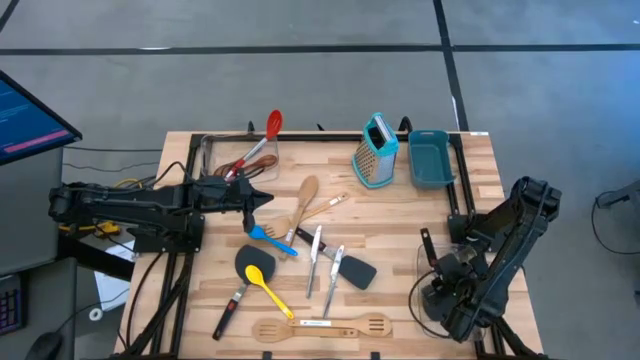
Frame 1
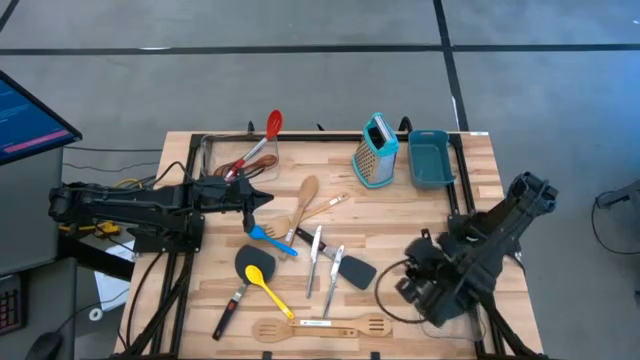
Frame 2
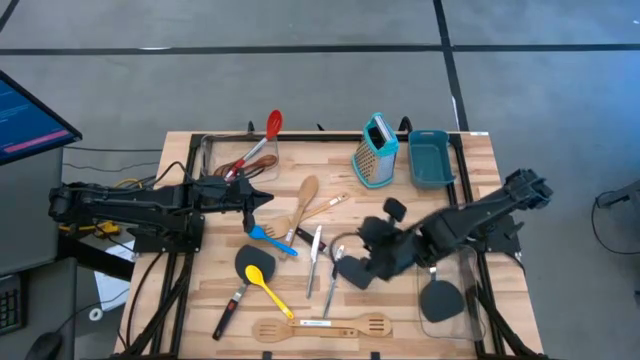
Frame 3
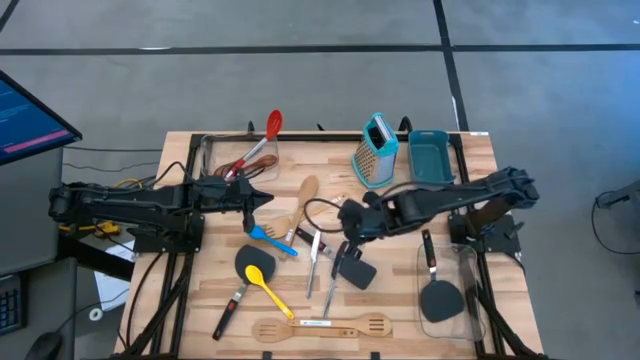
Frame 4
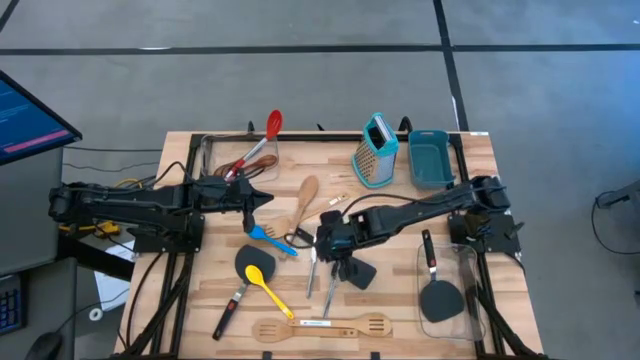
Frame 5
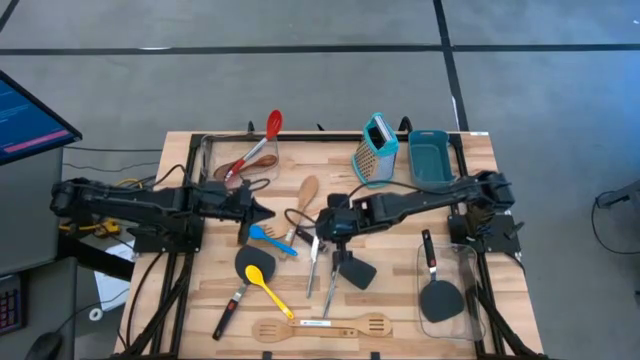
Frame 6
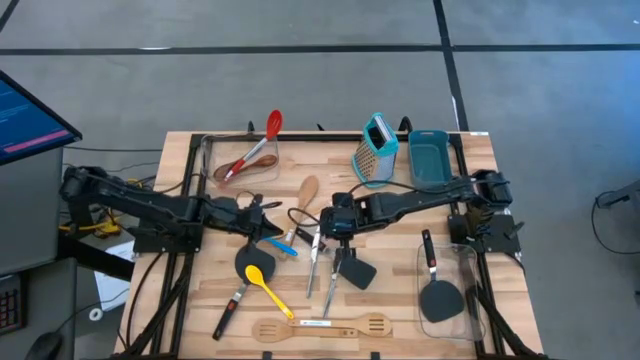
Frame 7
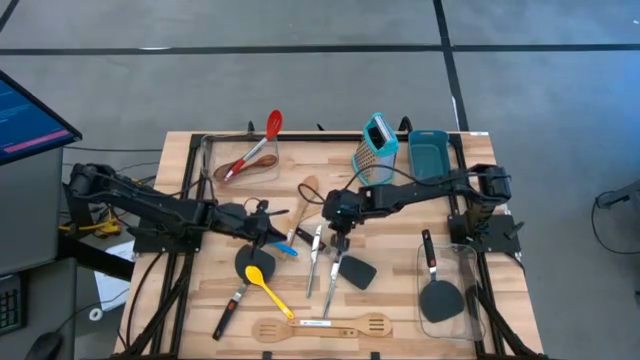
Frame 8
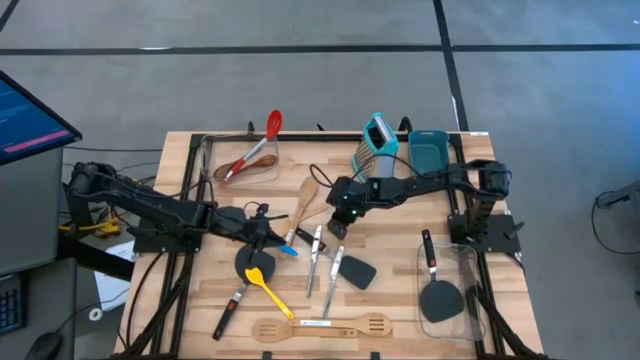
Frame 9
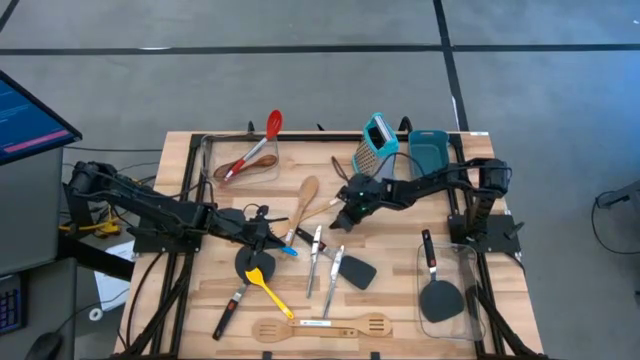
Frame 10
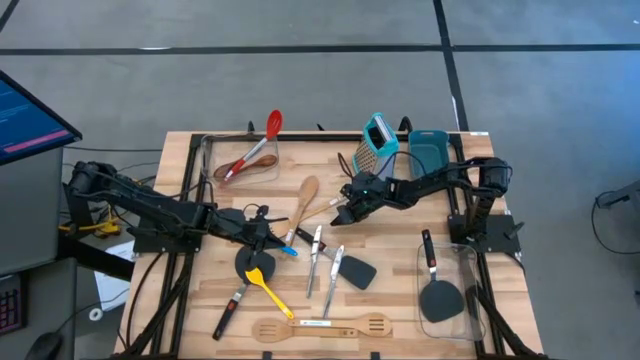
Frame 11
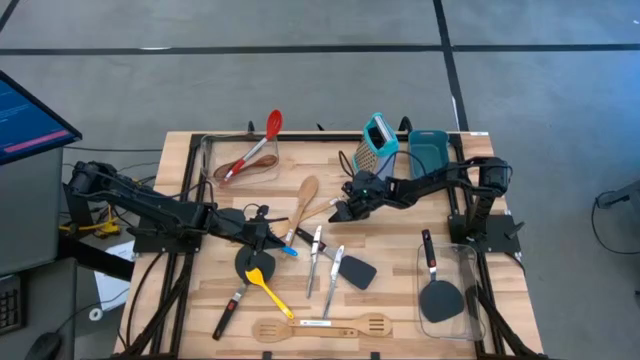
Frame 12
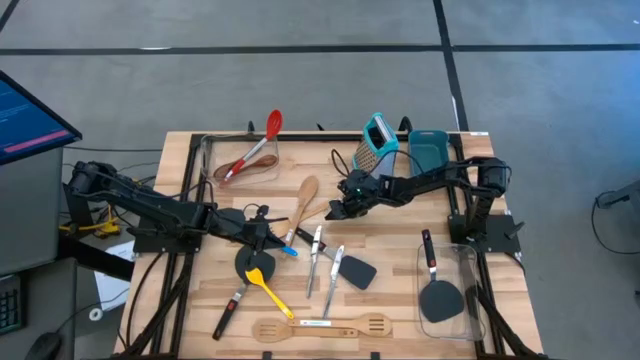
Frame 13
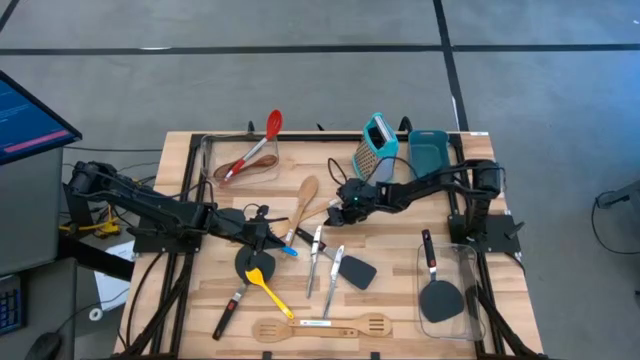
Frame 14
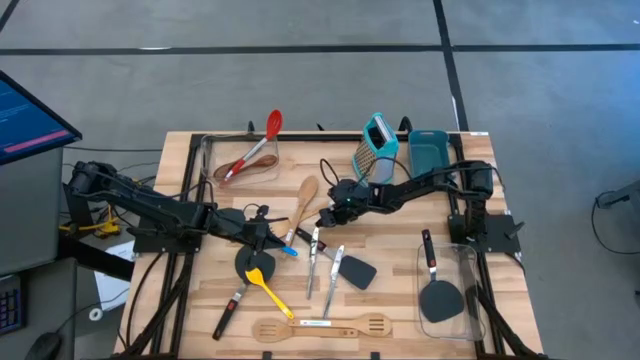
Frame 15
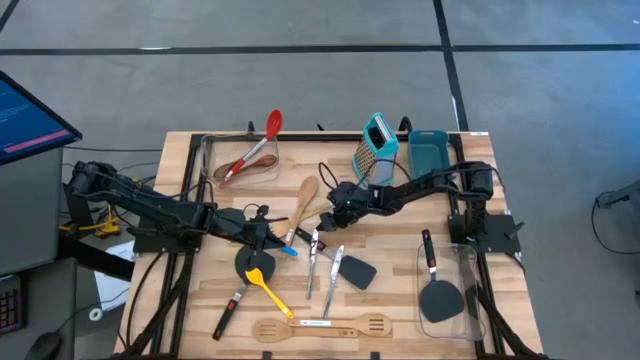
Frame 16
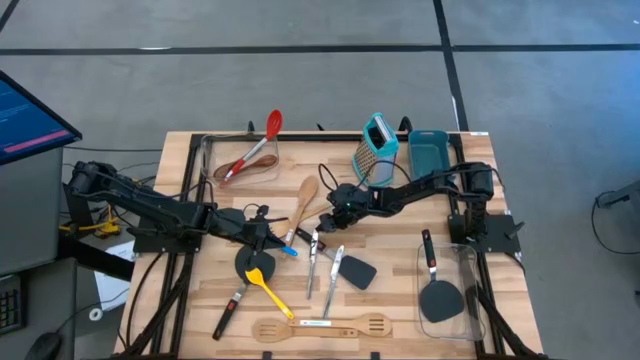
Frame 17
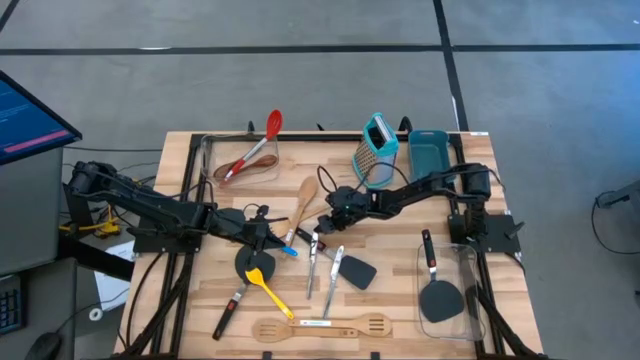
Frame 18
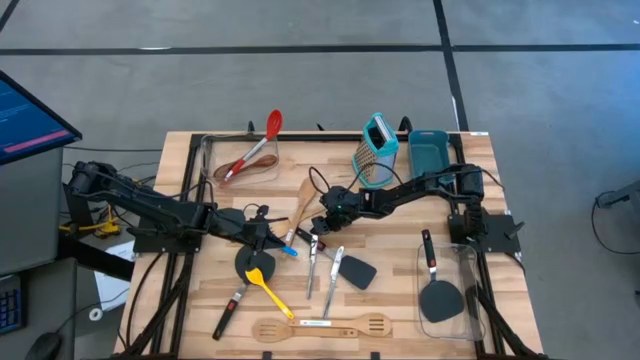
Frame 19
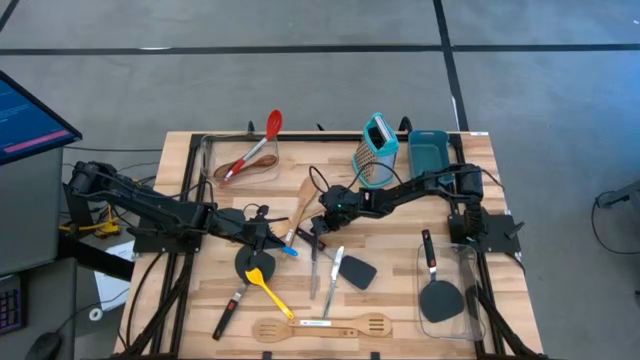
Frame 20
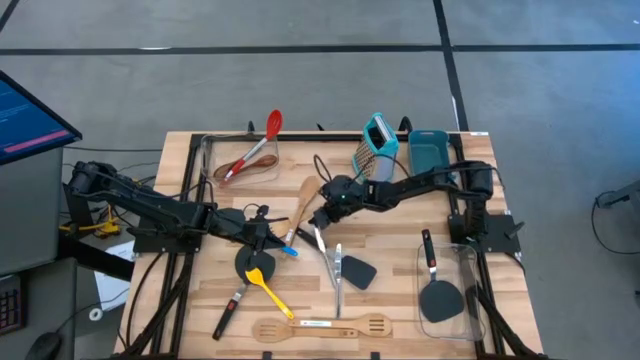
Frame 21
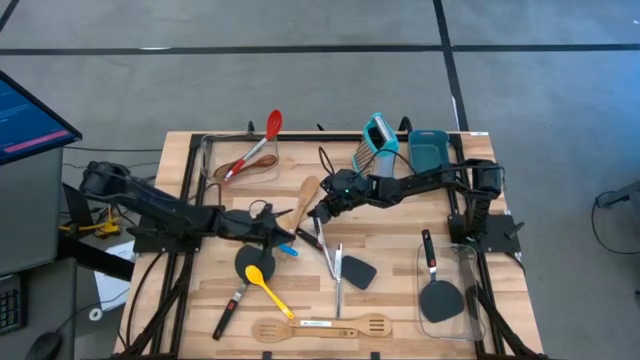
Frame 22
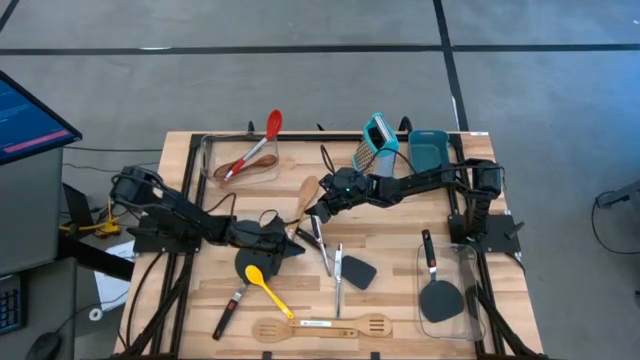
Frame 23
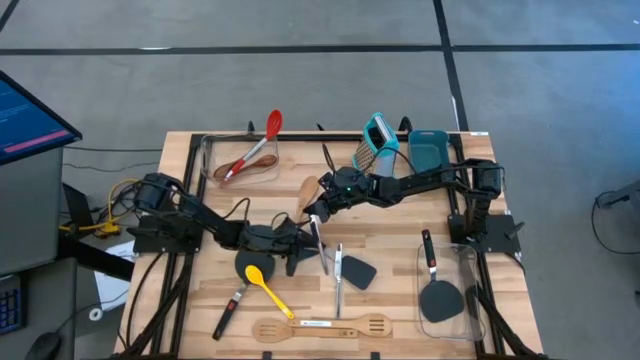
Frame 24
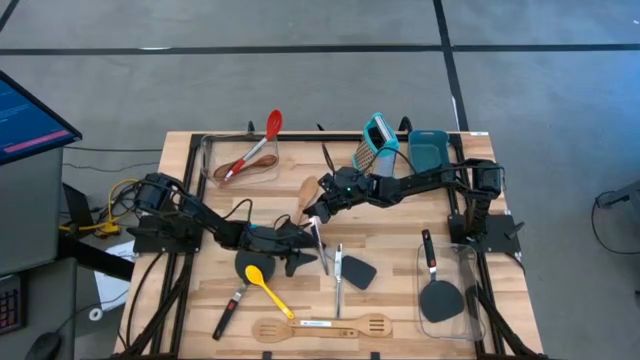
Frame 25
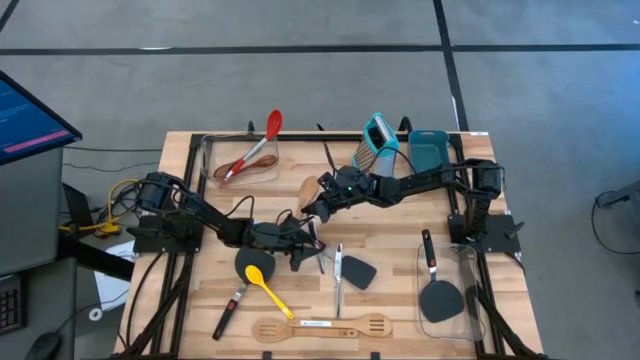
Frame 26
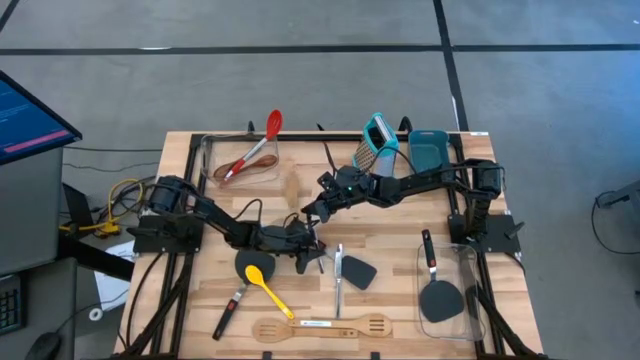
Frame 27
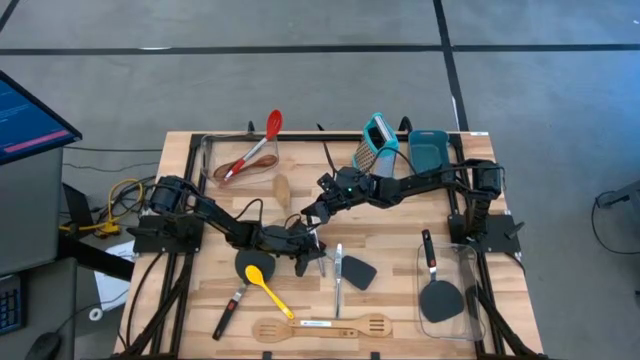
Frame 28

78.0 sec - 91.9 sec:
Task: Pick & Place Kitchen Items
Put the left silver knife into the green bin

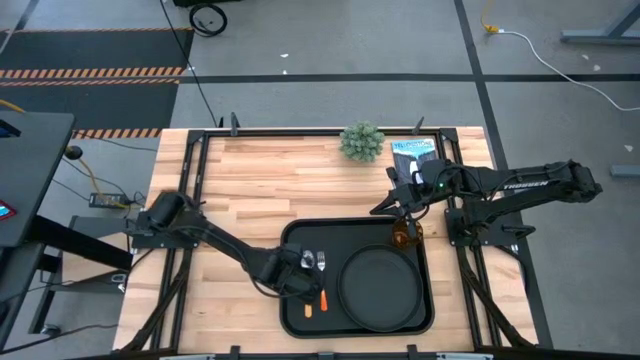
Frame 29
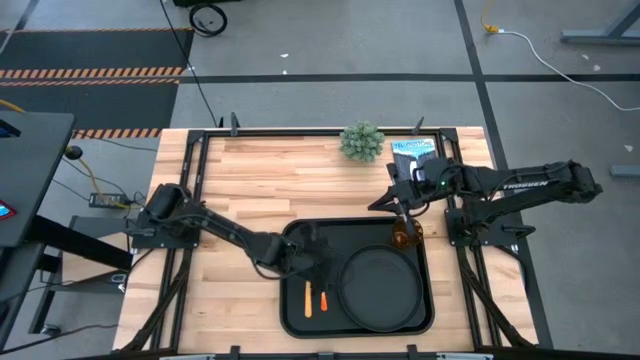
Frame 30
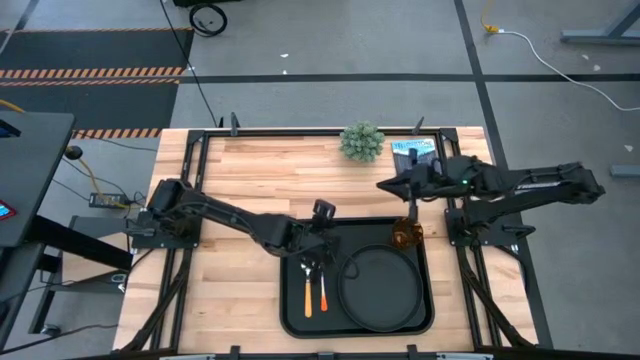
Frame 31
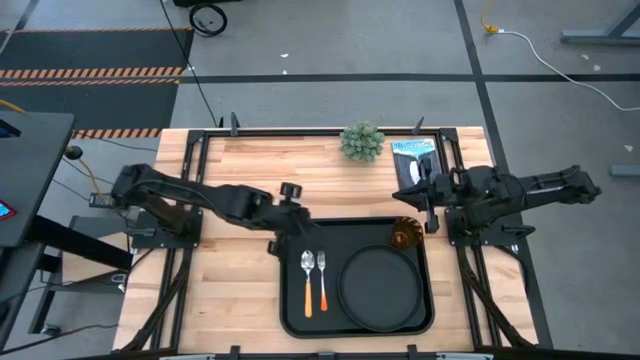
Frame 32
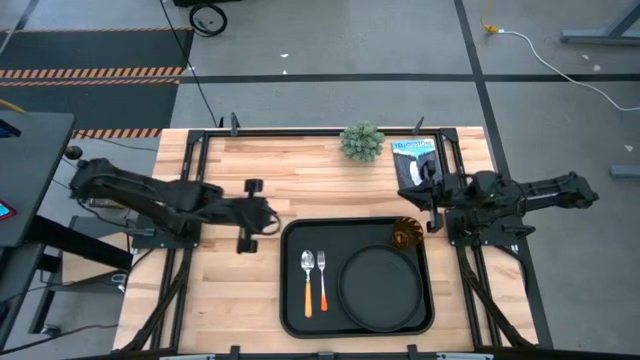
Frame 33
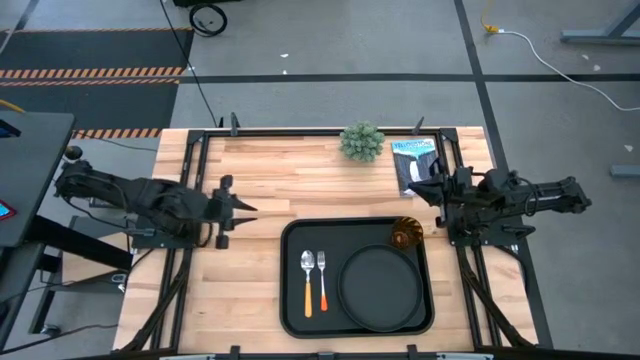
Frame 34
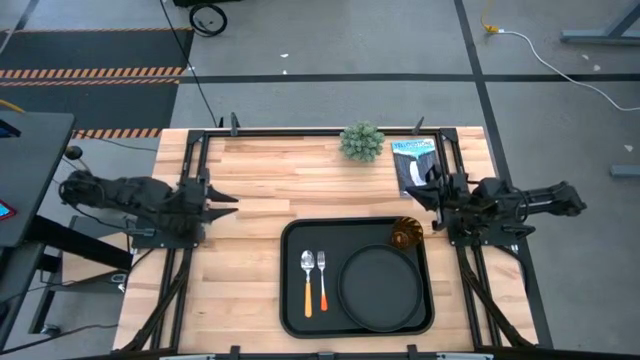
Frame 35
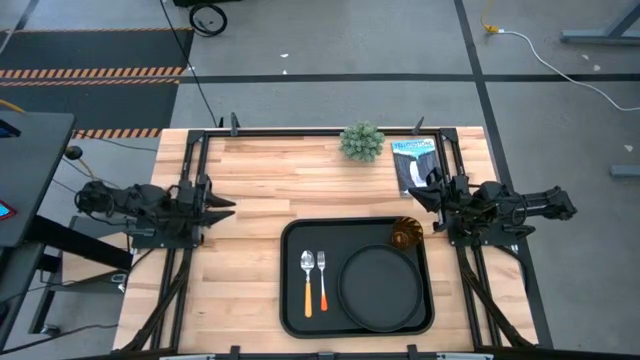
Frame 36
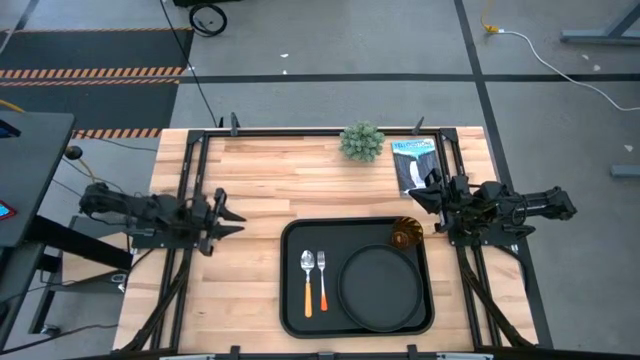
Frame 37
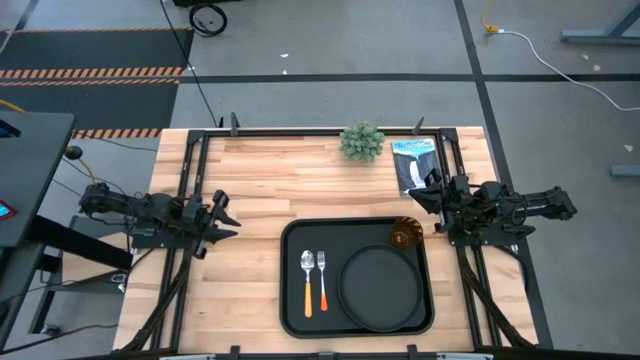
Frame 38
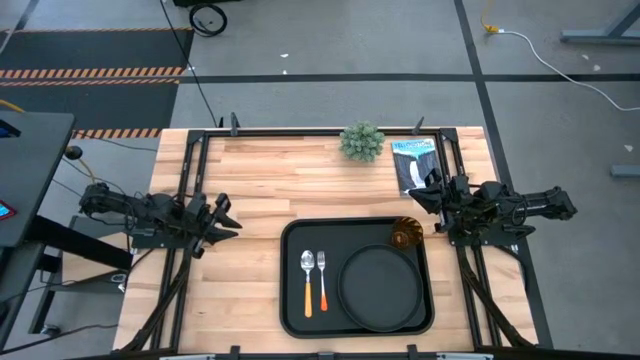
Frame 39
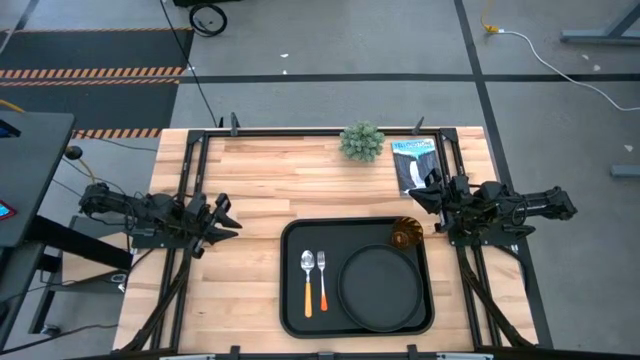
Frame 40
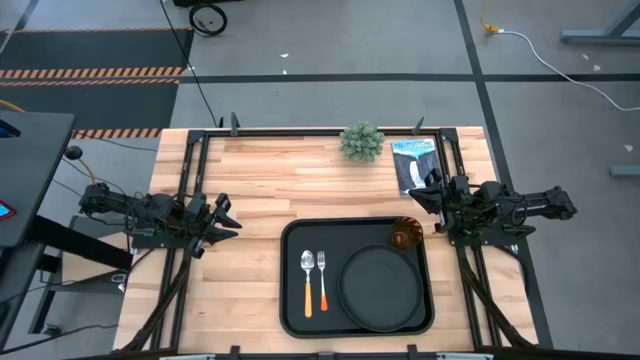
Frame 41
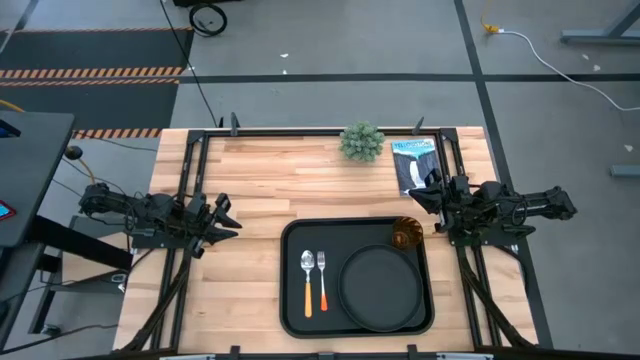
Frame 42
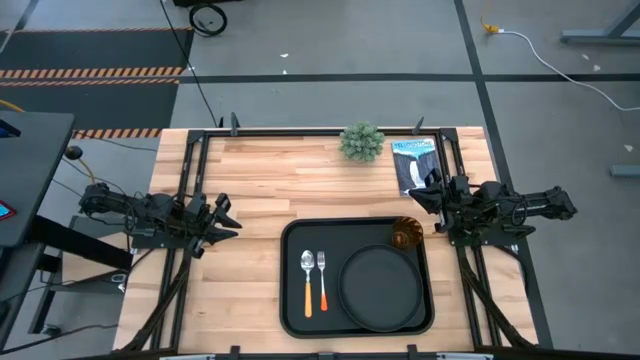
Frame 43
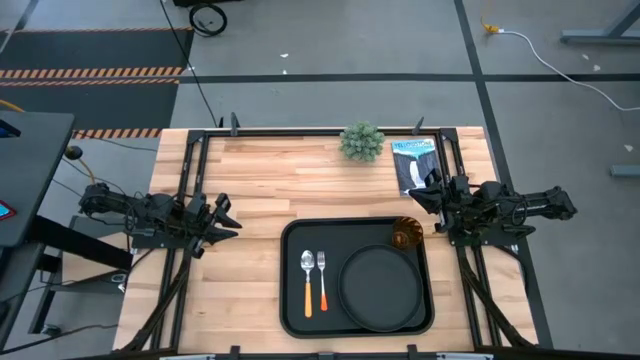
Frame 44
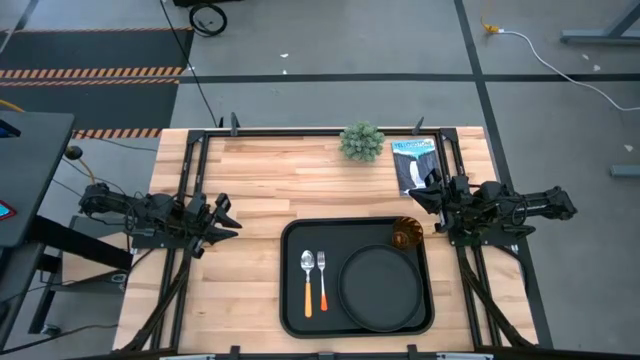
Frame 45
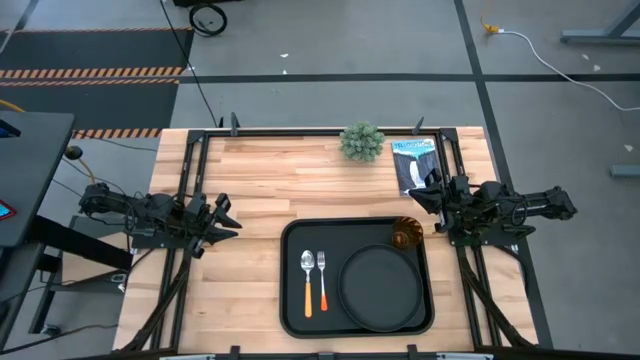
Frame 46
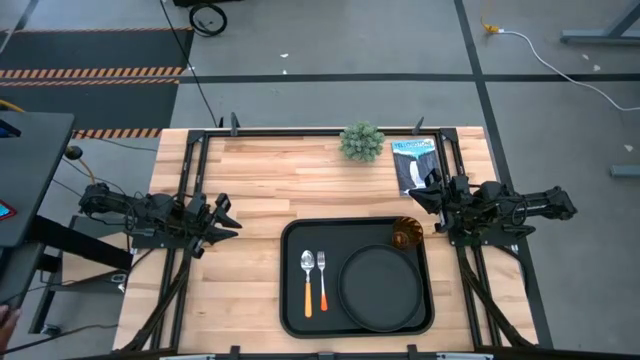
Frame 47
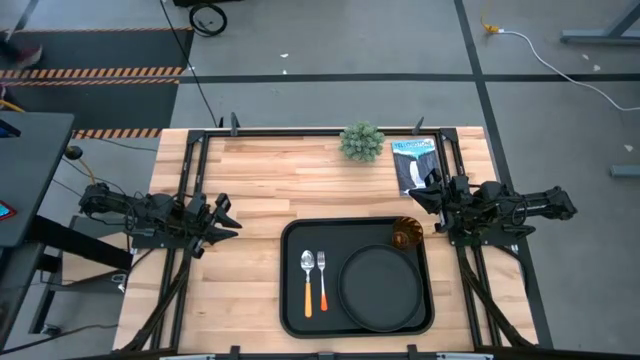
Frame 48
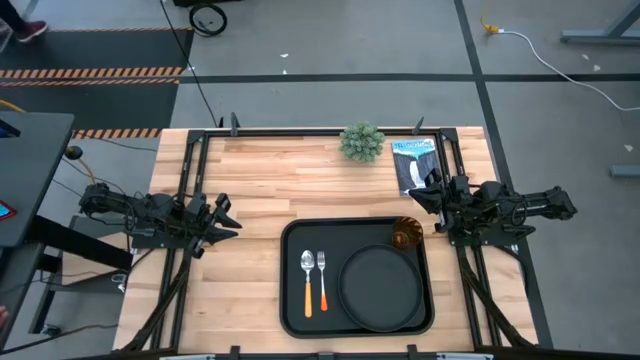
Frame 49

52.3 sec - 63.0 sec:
Task: Pick and place plate/cup/fork/spoon on tray
Return to Home Position
